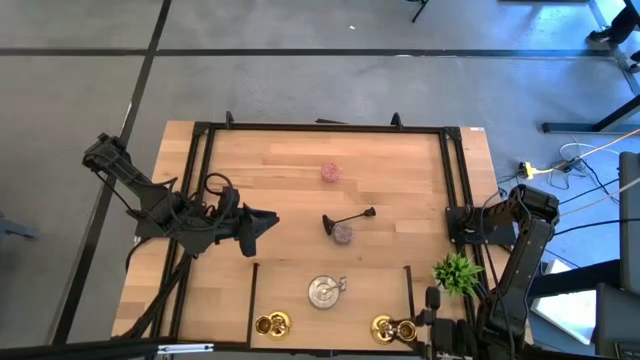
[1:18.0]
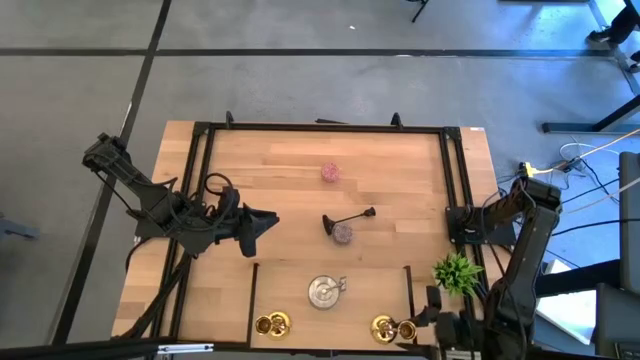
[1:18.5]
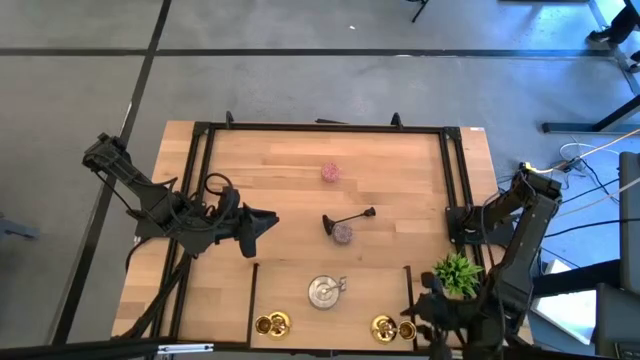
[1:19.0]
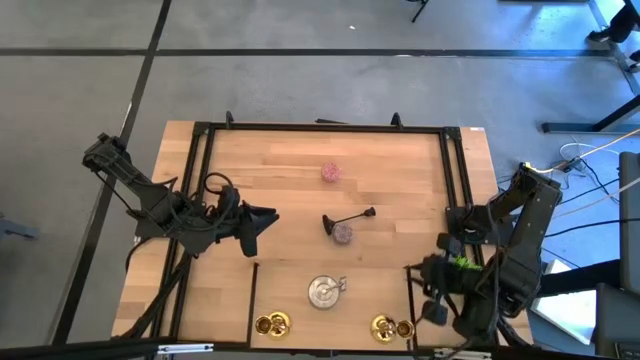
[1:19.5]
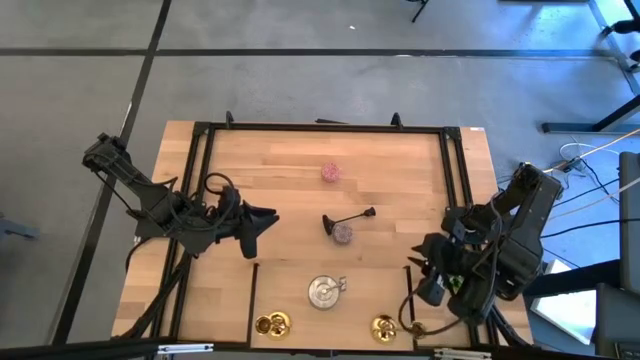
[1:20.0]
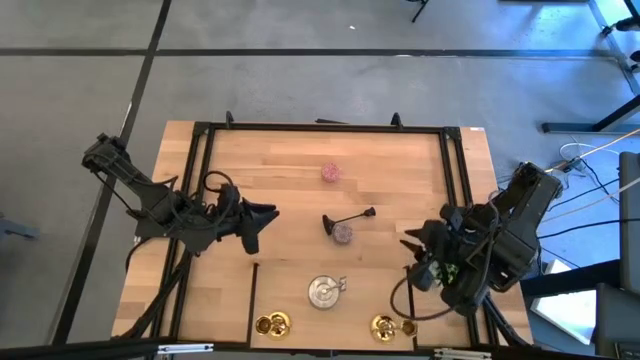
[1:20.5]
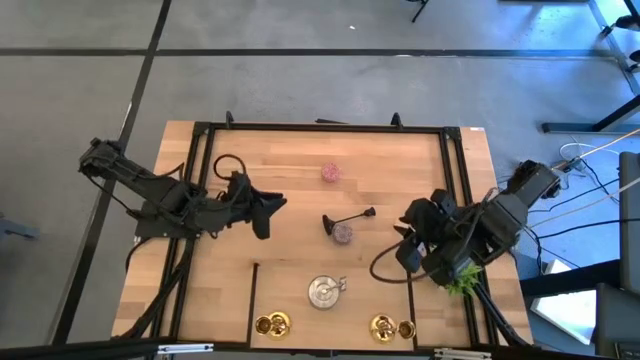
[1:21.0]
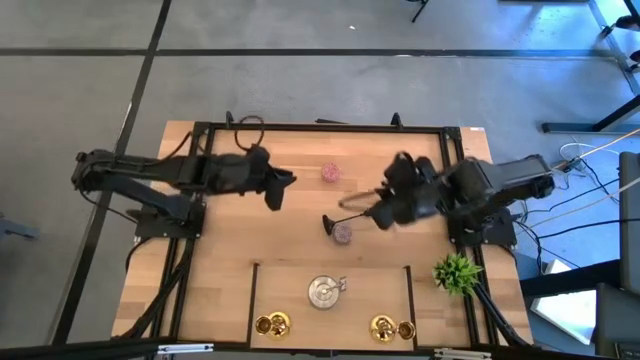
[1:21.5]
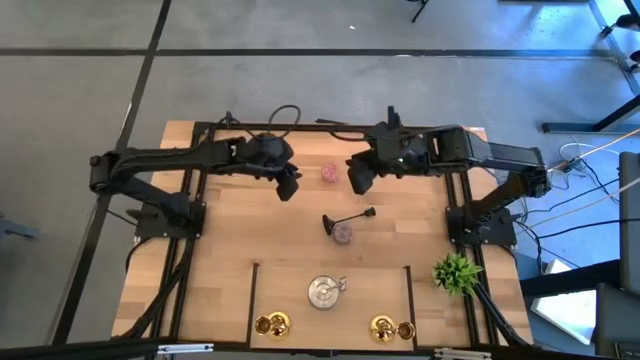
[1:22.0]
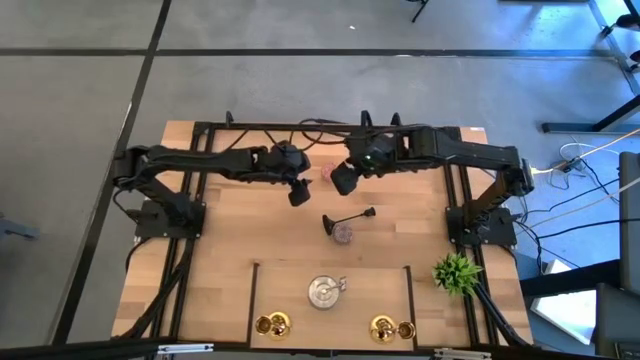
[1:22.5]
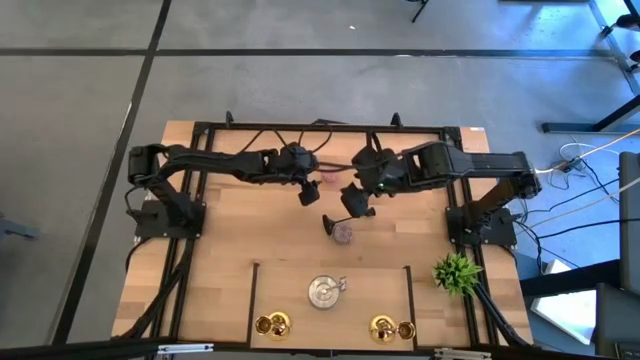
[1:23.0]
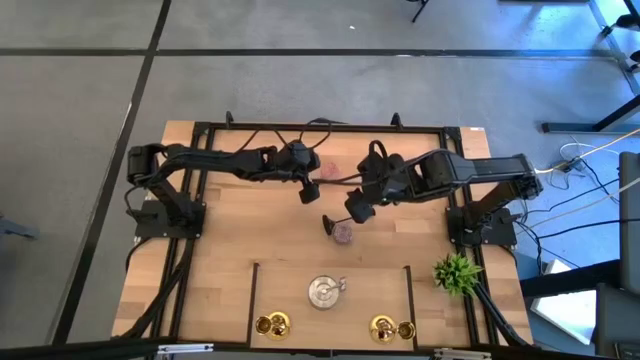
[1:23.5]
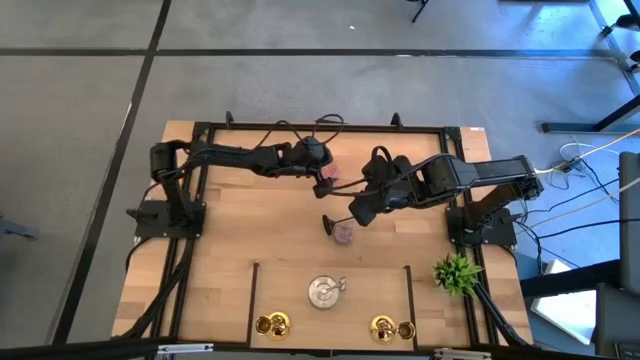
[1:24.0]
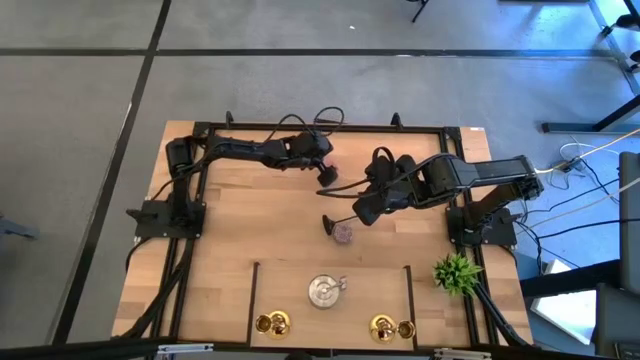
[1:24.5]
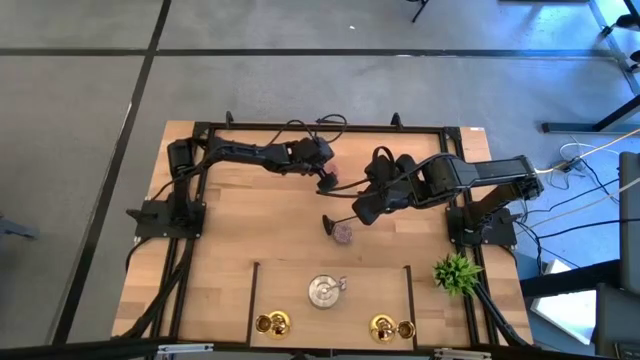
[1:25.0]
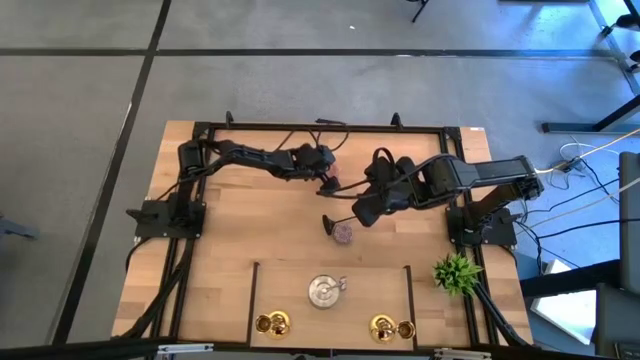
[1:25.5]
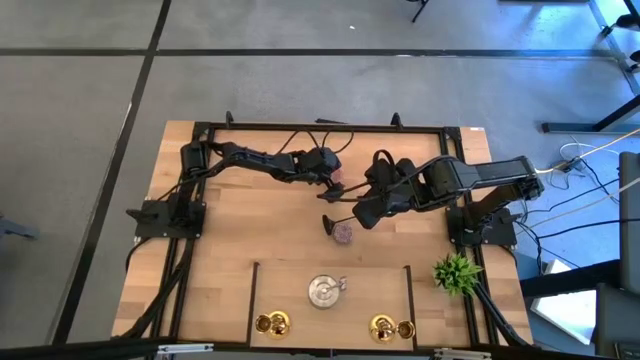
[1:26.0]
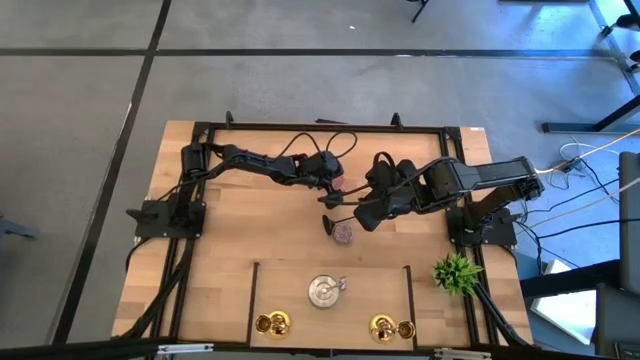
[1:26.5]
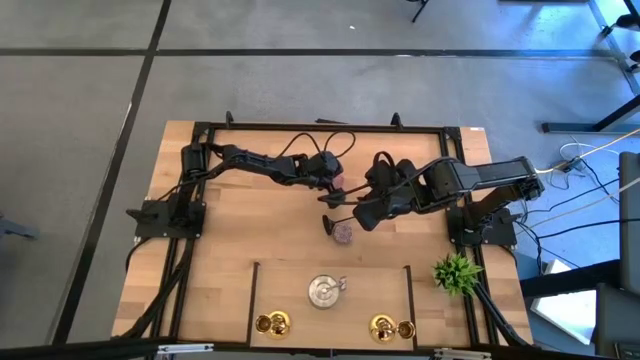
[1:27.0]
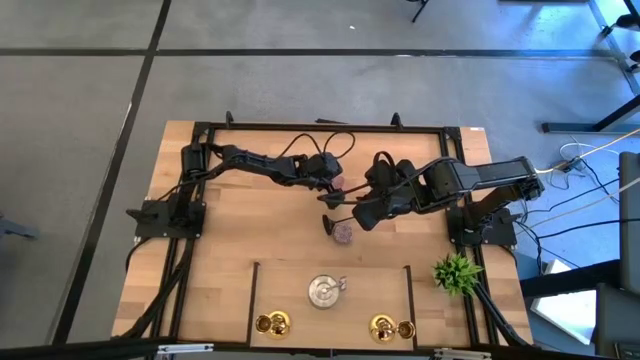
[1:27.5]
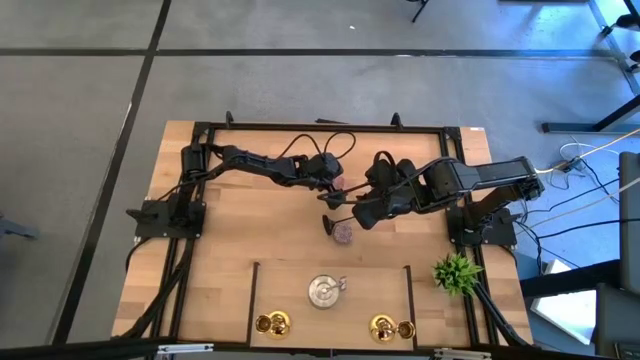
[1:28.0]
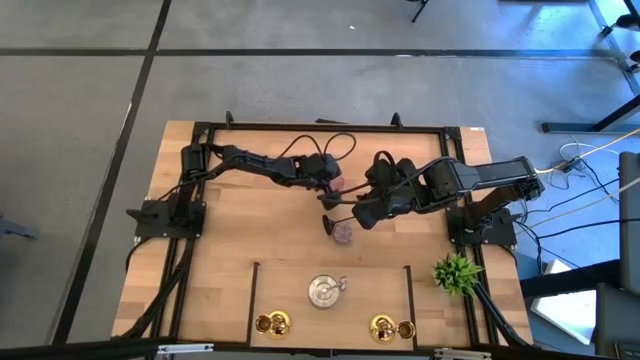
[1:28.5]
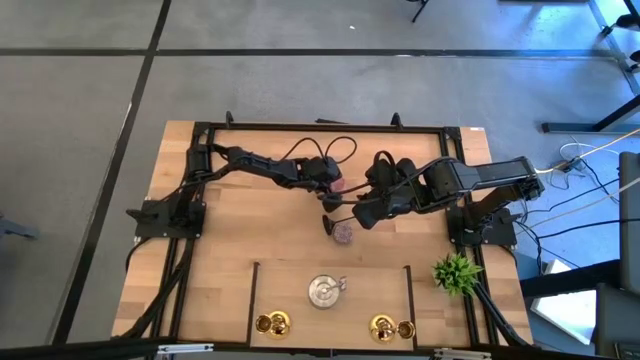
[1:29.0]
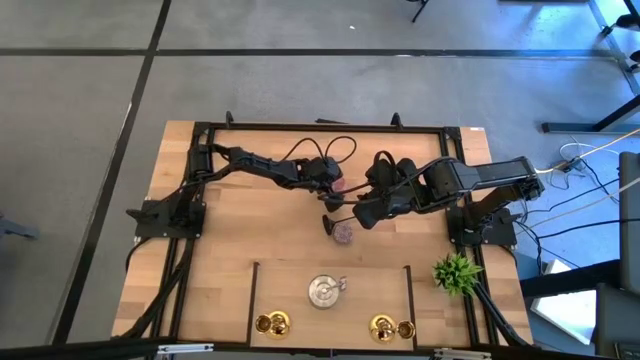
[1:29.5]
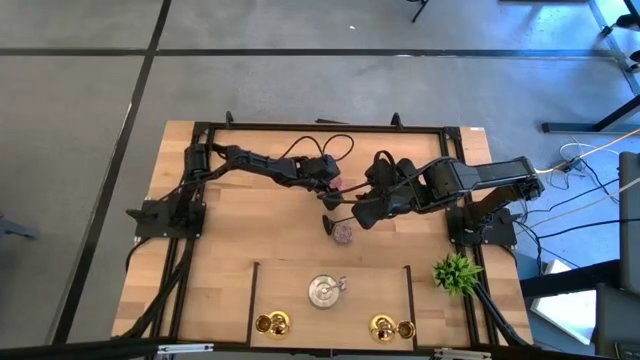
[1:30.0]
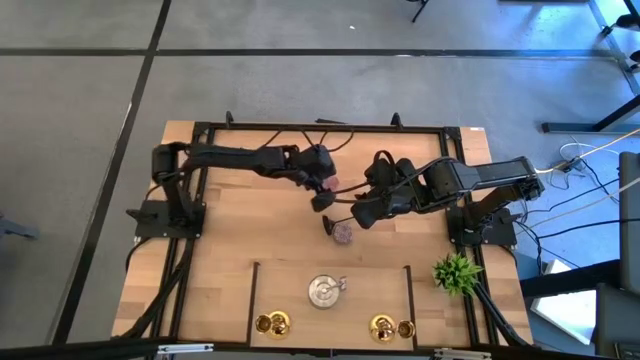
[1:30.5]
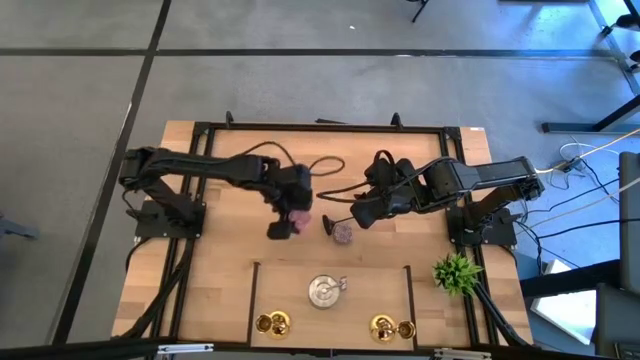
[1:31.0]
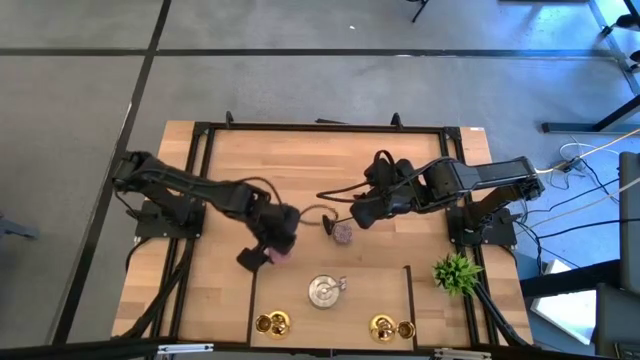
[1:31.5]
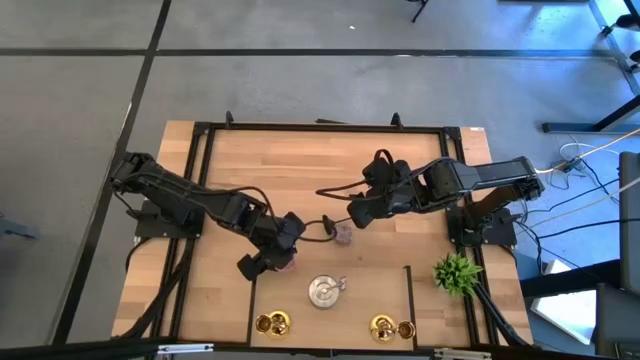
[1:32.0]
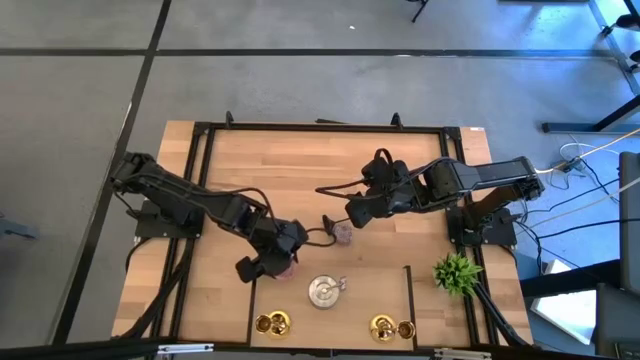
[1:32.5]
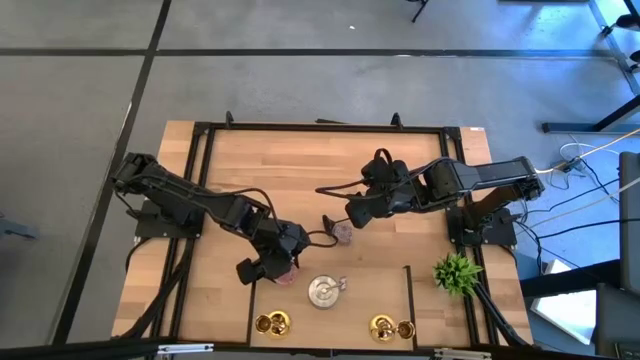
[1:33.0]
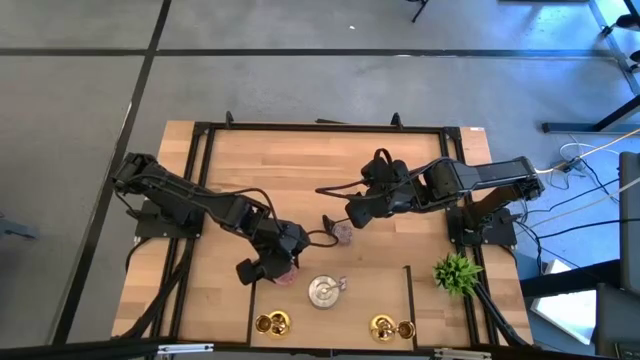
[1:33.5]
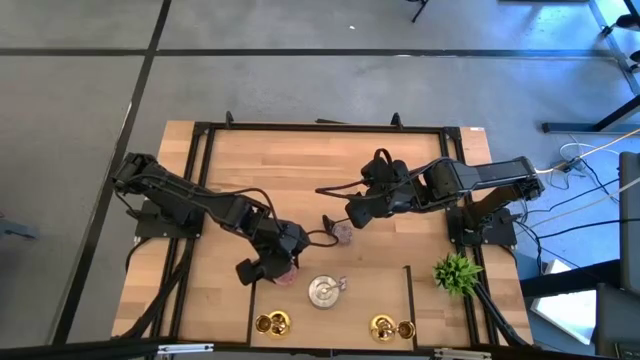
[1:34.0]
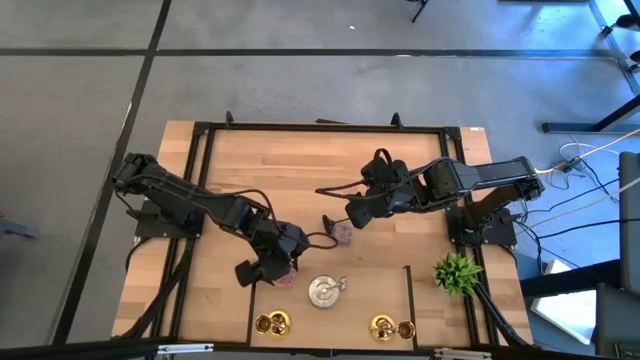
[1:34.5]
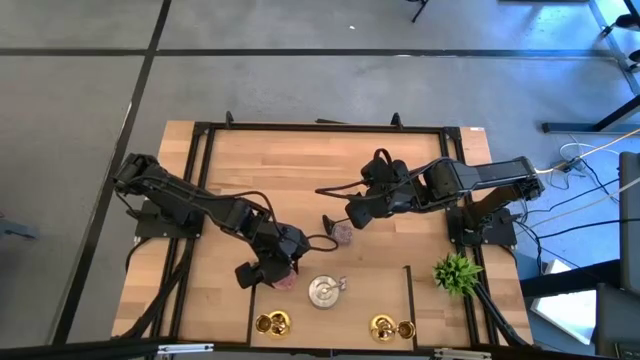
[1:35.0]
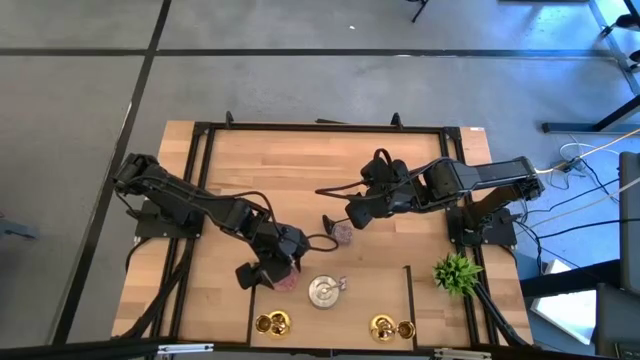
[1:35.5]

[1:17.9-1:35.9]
Task: Pick & Place candle stick holders
Put the pink scented candle on the shelf

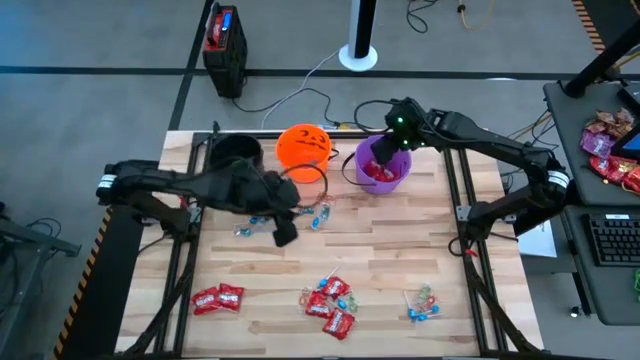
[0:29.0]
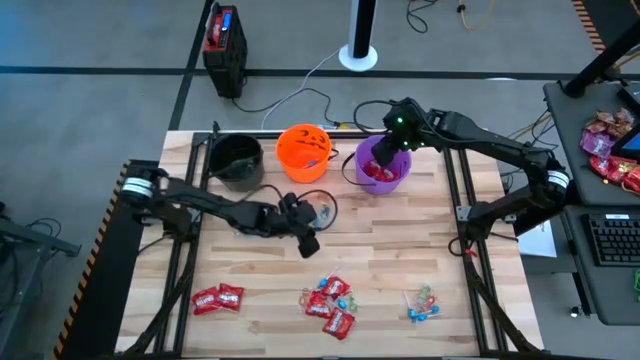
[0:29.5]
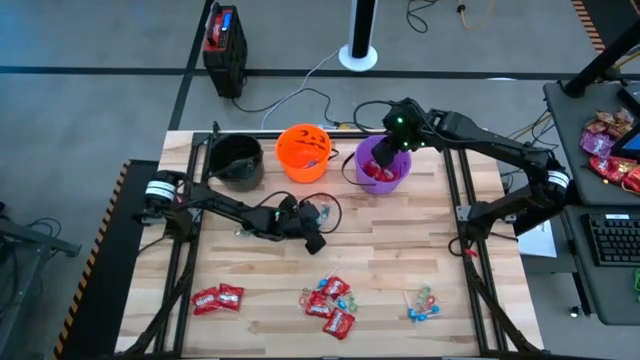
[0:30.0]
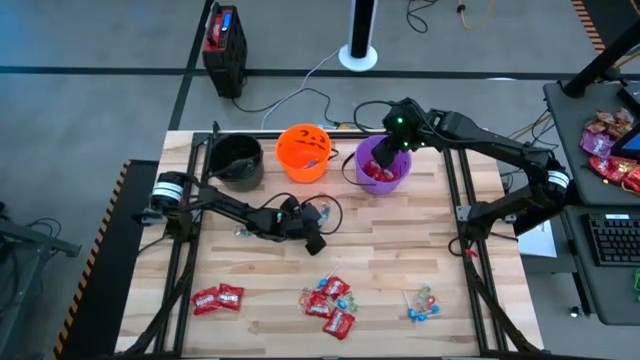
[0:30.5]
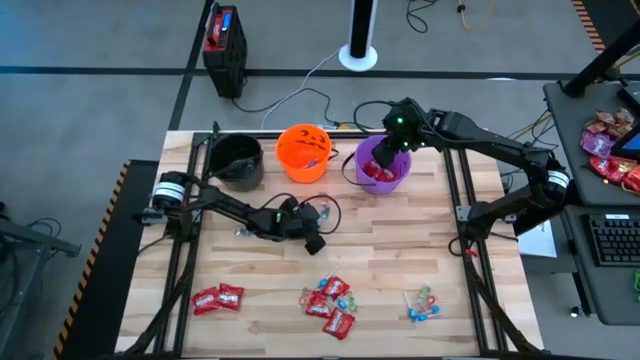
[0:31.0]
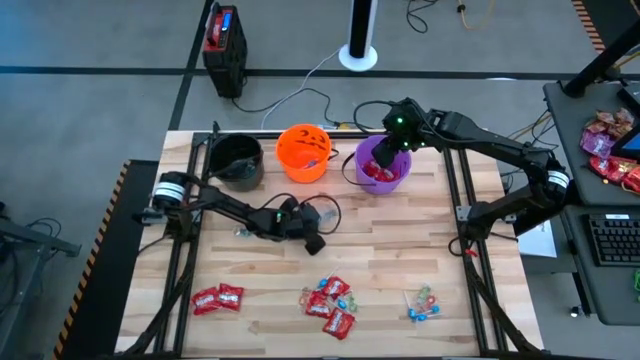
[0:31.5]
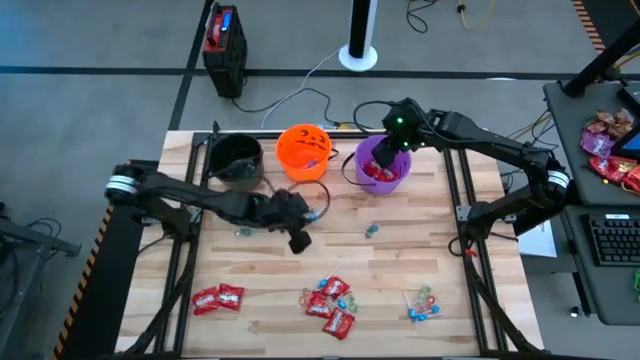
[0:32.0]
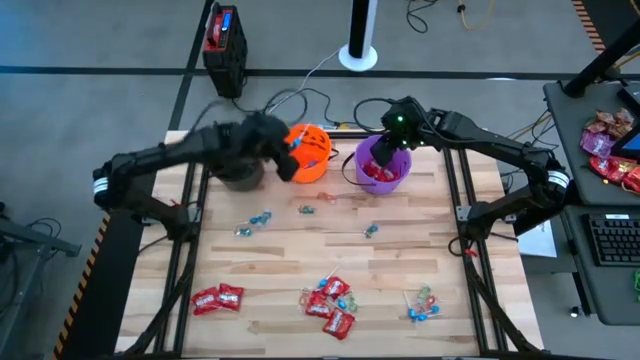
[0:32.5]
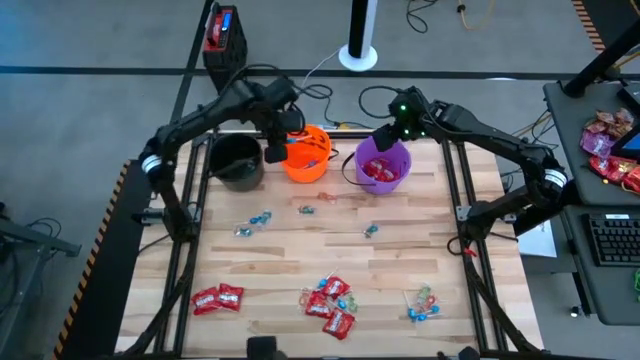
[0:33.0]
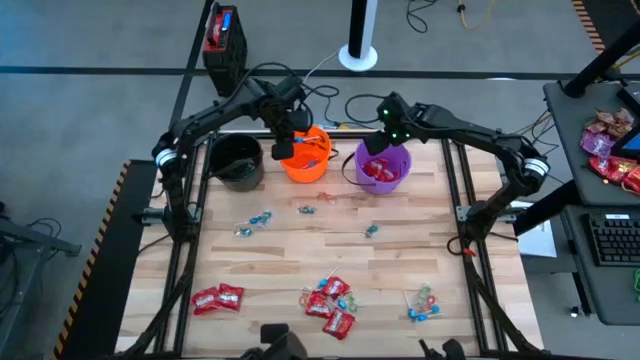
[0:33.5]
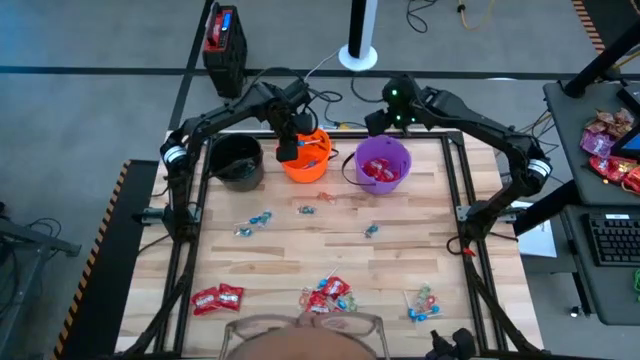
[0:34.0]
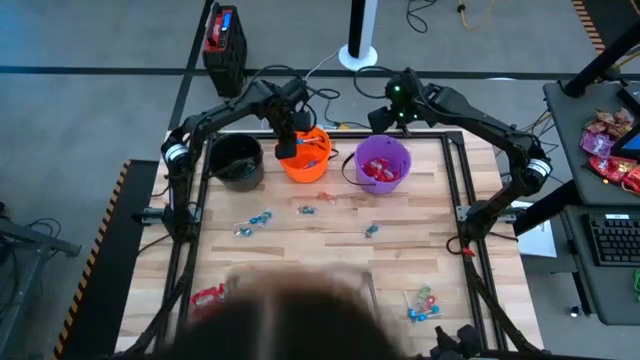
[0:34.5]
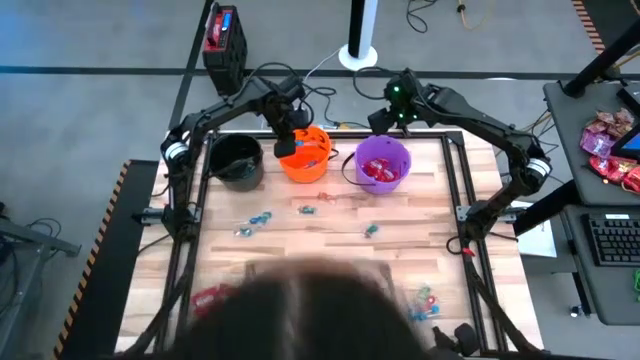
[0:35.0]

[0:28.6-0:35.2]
Task: Sort candy by brand, put in halloween buckets
Put the blue candy into the orange bucket
